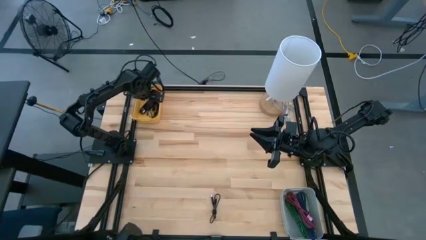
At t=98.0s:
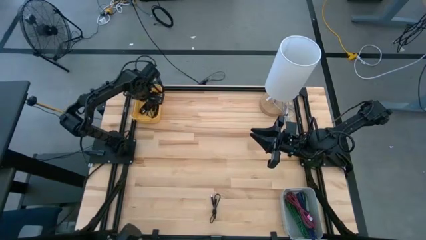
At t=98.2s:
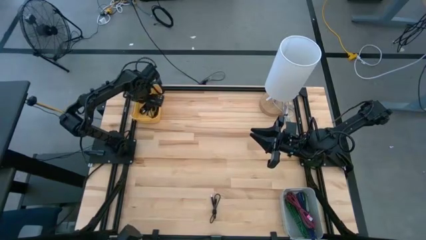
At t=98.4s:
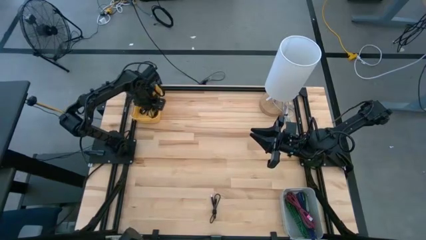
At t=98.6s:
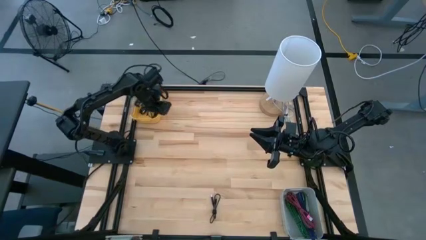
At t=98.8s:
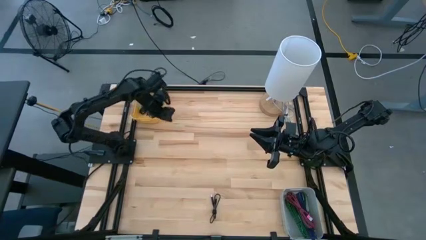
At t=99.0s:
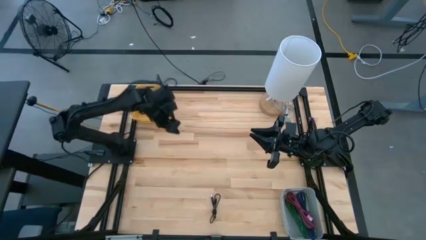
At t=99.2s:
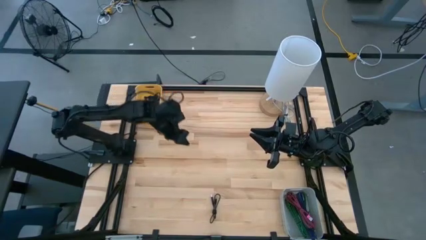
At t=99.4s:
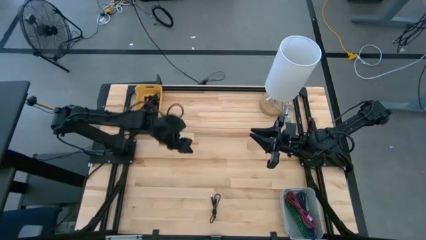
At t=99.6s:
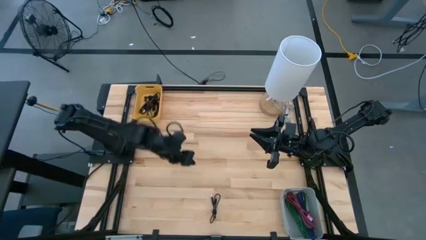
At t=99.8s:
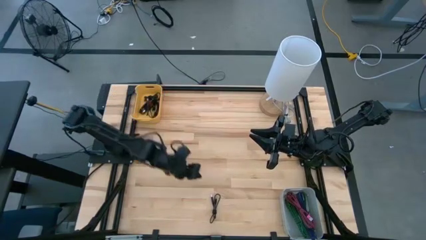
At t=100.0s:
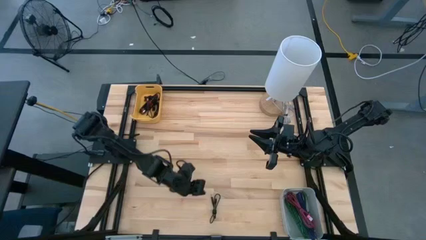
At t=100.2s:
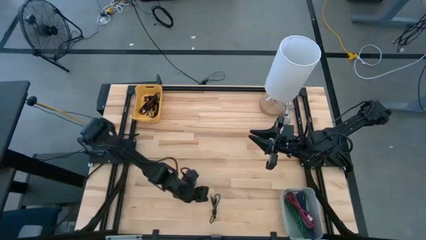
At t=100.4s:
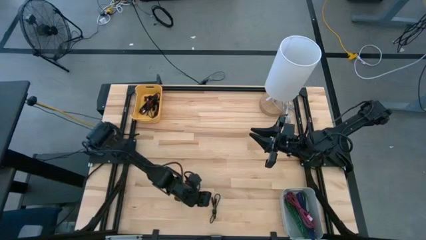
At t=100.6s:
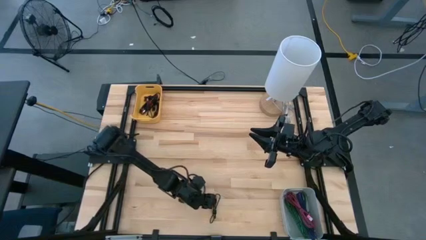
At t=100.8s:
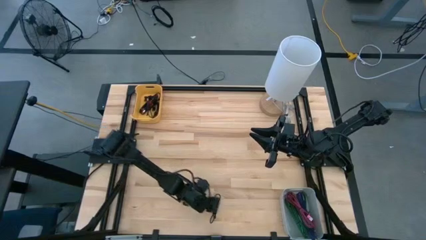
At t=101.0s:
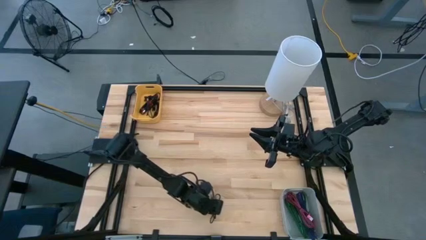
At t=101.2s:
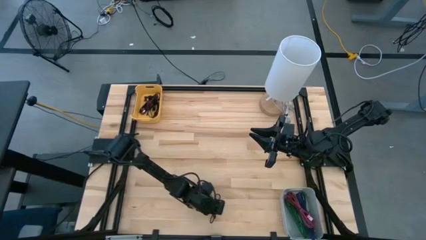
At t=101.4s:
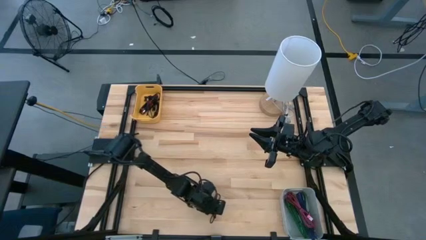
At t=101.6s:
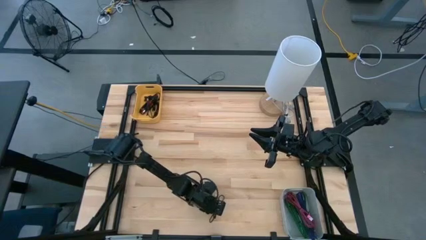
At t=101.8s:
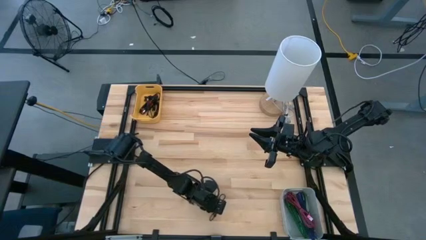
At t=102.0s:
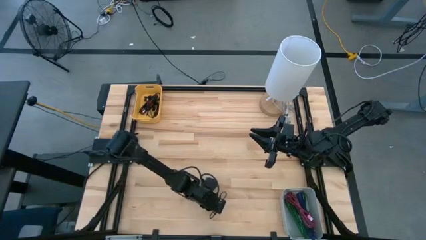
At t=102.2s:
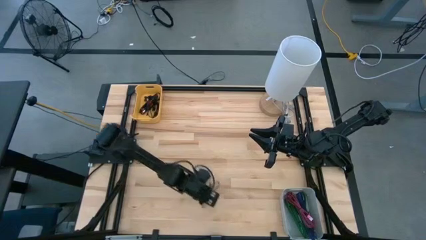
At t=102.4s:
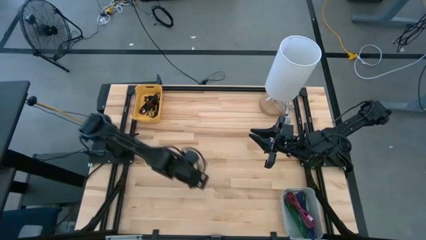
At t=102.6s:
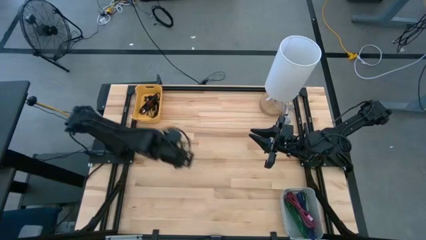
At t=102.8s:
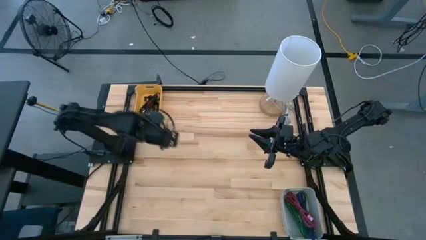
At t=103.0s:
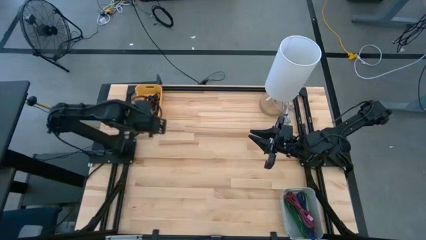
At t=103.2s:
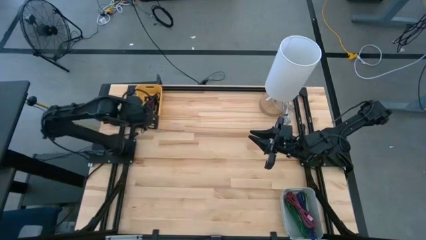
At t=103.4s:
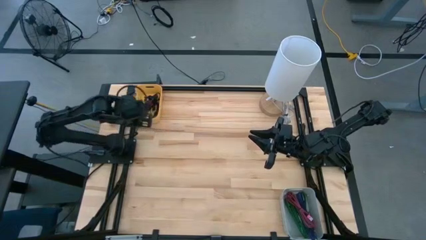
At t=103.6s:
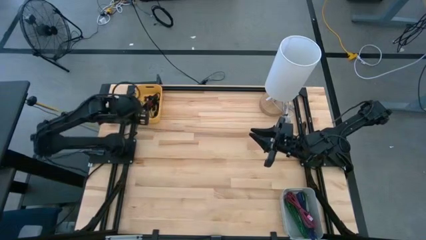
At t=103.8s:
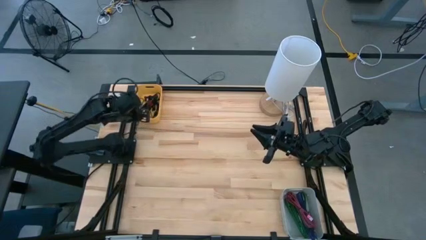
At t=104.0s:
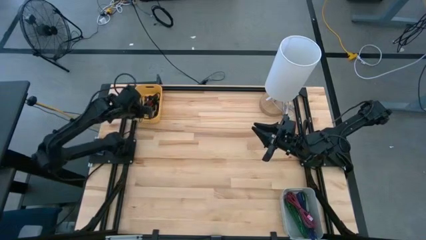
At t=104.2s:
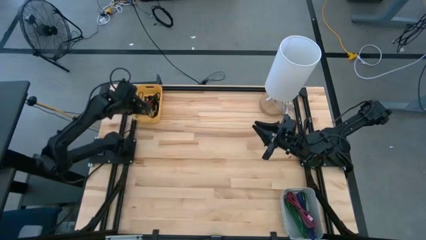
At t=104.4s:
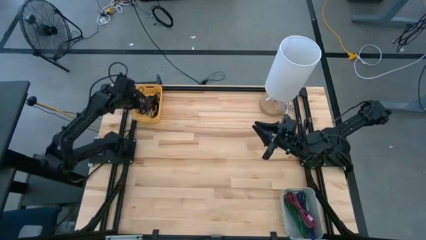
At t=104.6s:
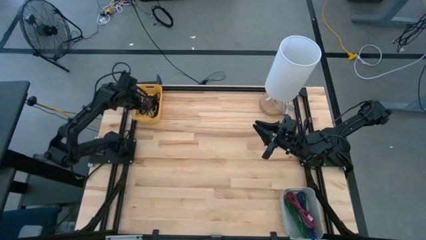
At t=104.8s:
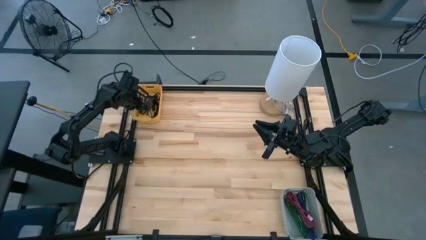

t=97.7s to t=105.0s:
Task: Pick & Place USB Port
Put the black charger cable into the yellow bin

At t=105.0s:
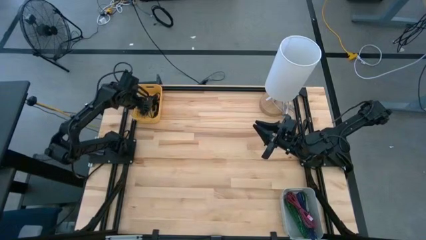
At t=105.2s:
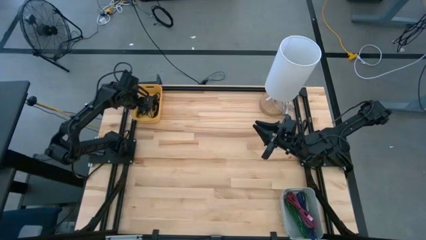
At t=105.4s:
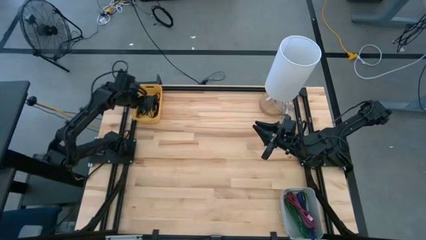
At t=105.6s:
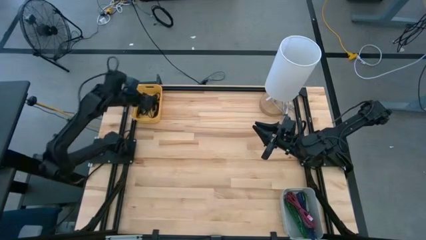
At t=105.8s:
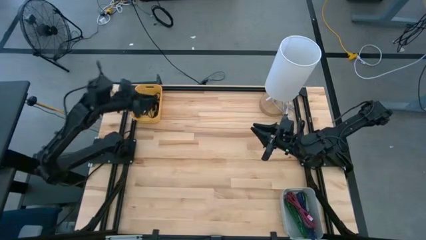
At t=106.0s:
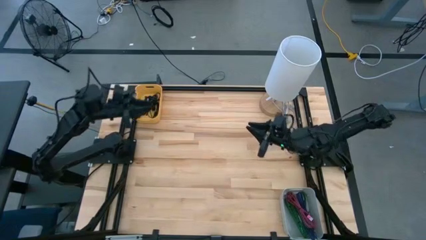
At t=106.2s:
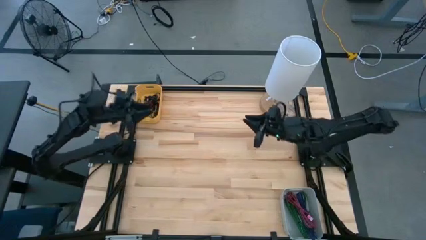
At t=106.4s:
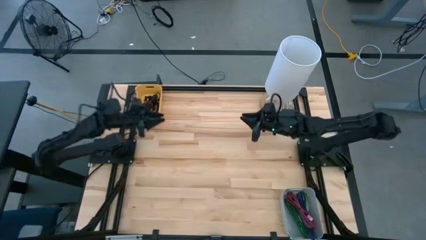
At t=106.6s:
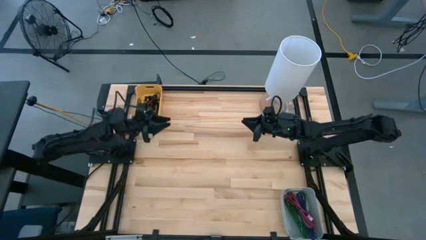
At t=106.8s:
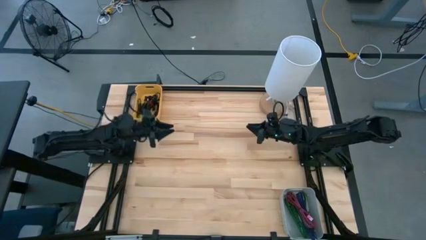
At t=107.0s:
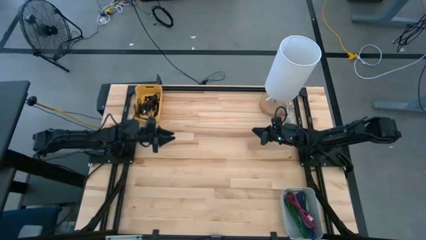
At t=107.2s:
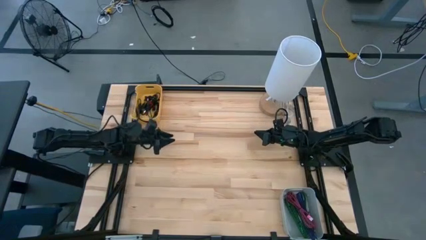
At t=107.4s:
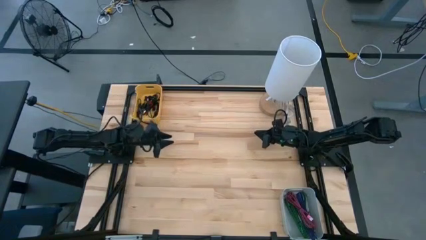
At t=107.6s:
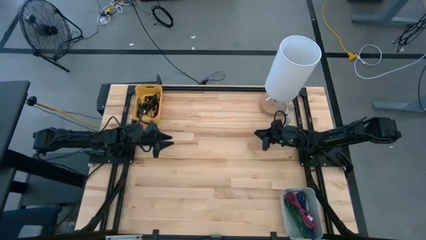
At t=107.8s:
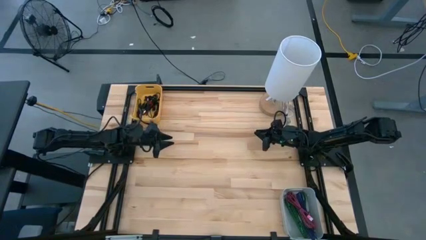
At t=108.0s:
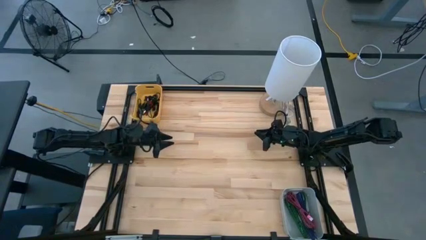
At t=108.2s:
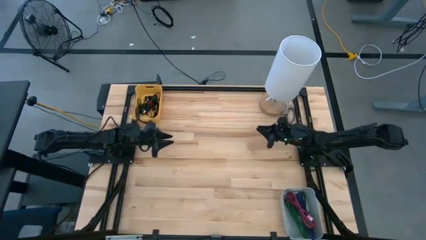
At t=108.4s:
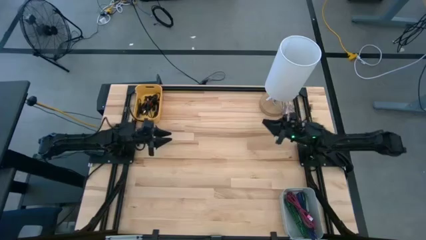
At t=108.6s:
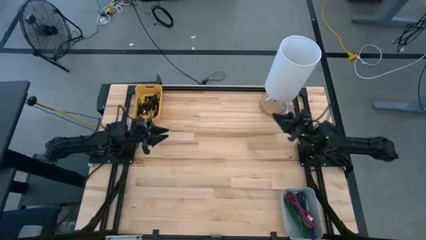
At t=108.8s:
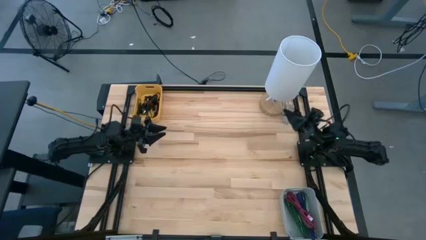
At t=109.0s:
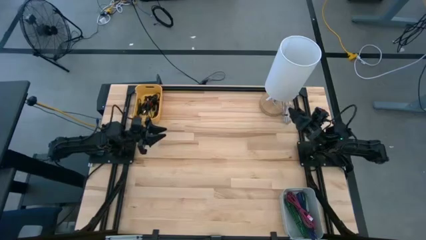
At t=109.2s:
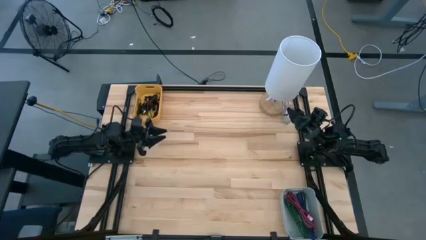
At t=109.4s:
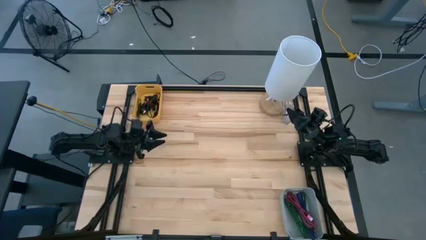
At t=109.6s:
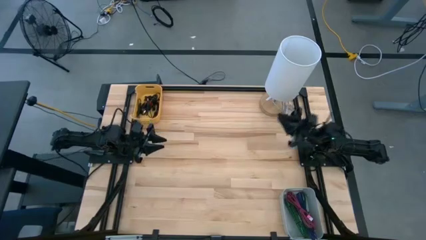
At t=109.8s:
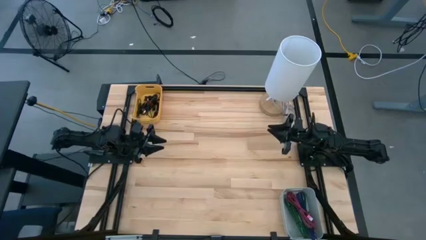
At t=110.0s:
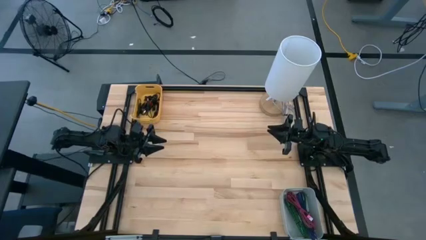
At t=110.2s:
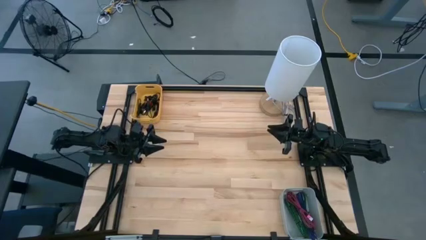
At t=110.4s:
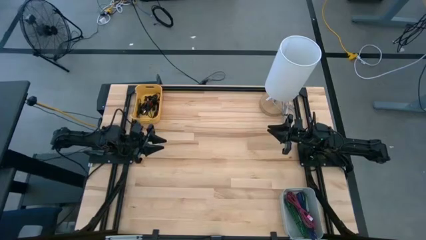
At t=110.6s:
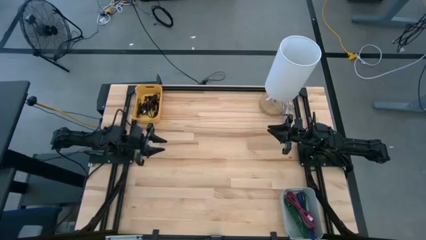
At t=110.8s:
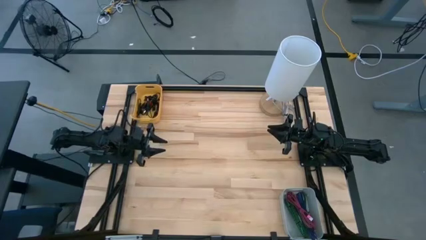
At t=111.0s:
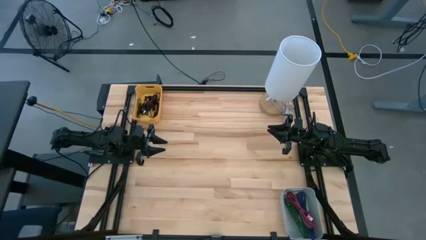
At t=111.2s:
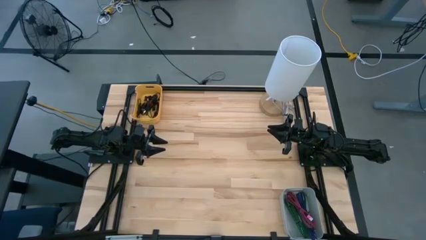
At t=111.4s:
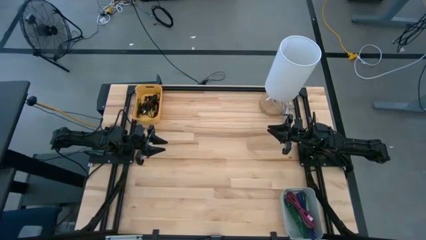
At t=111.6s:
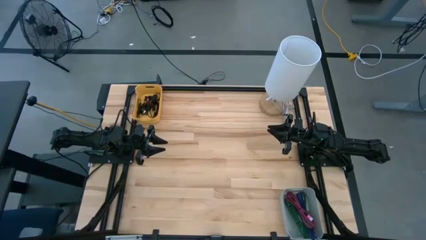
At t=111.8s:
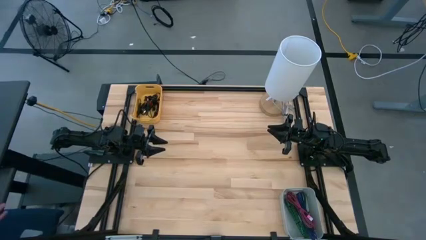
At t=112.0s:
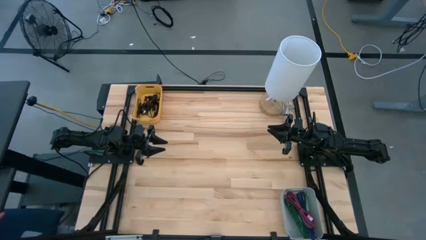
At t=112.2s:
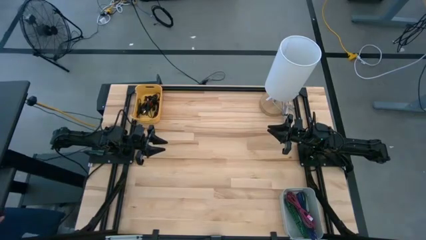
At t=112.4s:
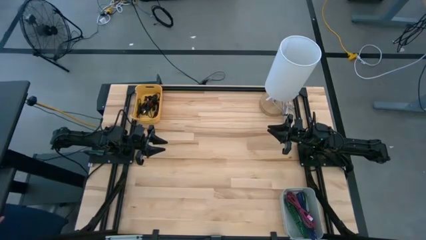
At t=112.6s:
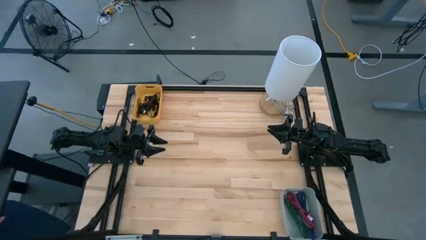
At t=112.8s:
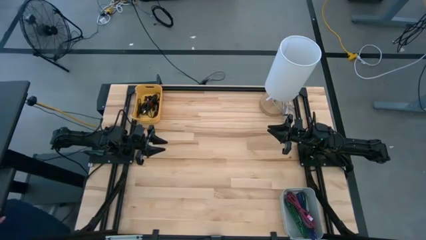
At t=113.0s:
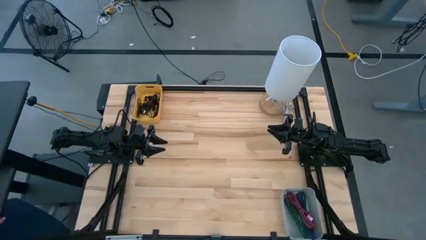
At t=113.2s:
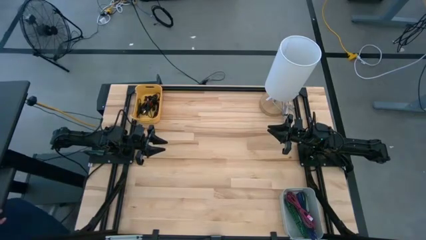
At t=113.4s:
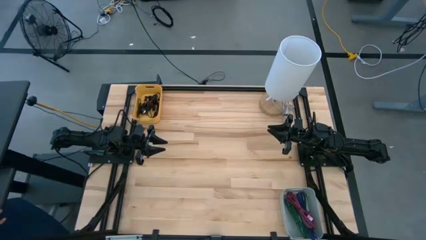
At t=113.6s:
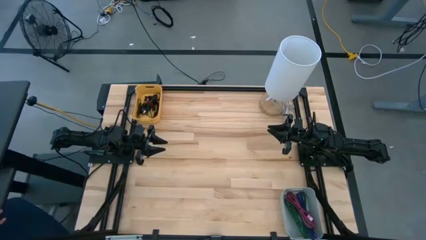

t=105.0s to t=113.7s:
Return to Home Position
